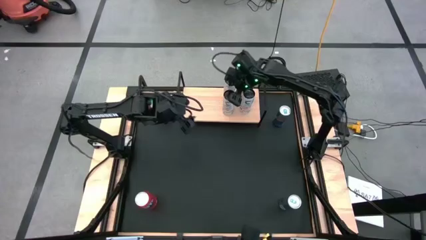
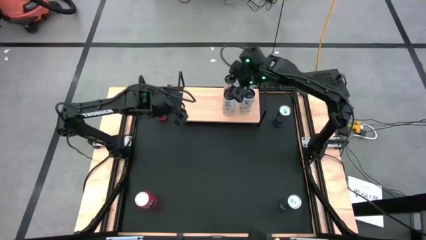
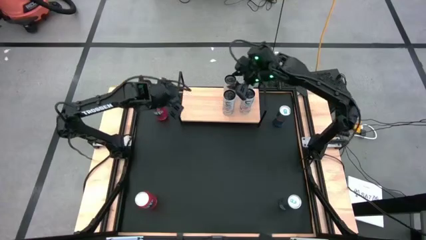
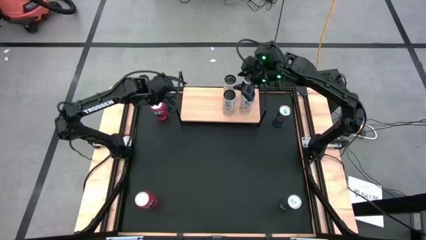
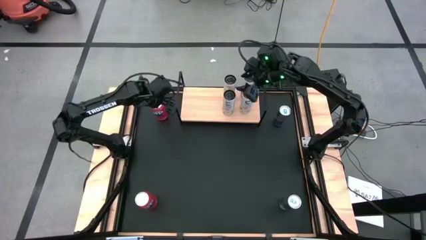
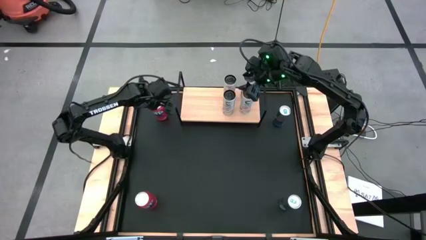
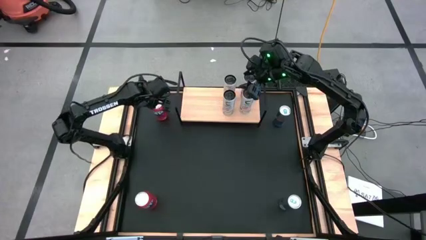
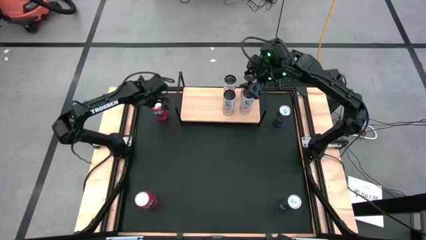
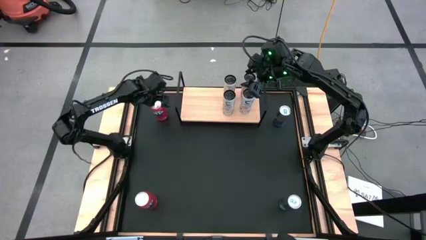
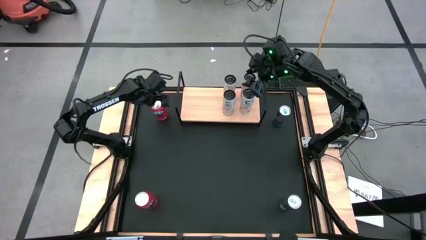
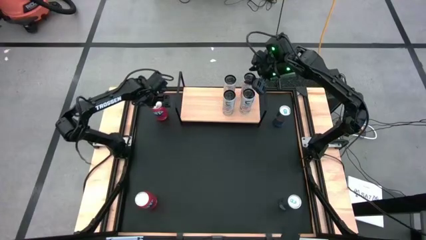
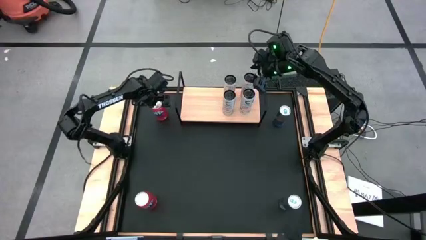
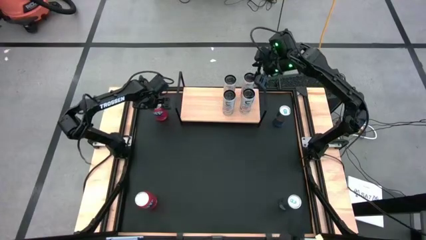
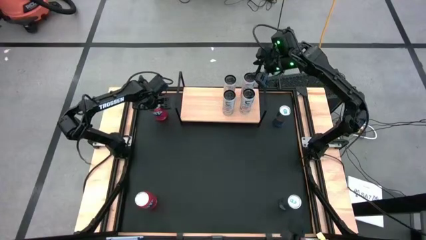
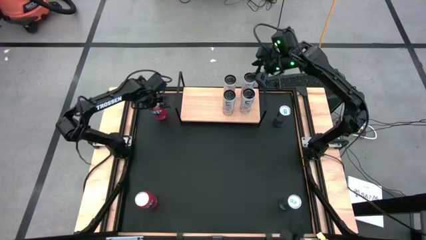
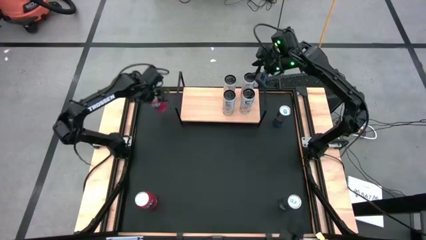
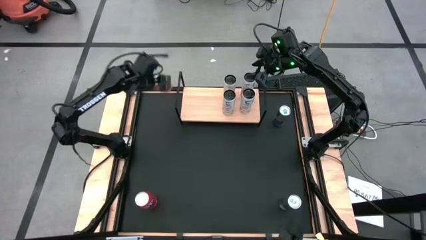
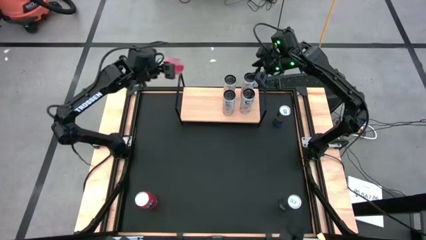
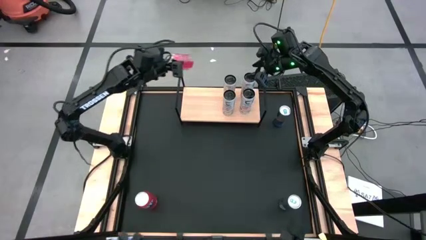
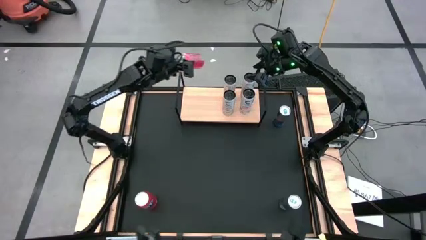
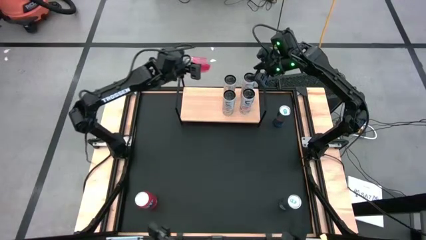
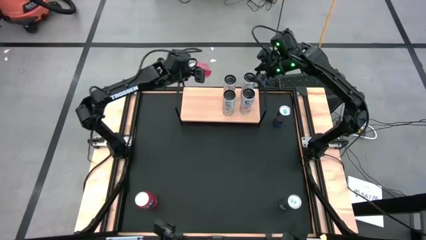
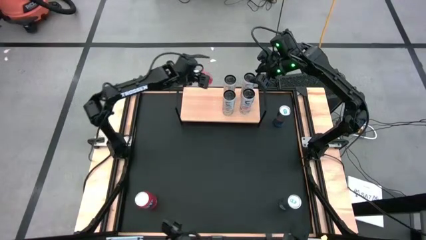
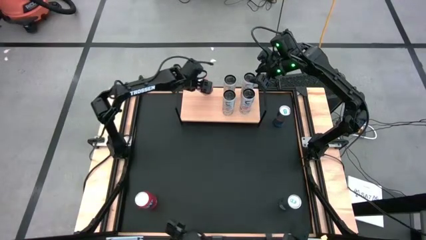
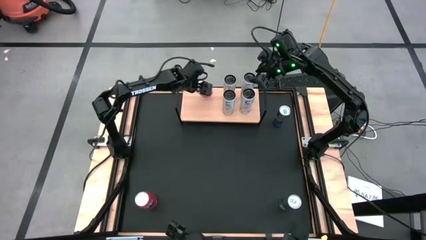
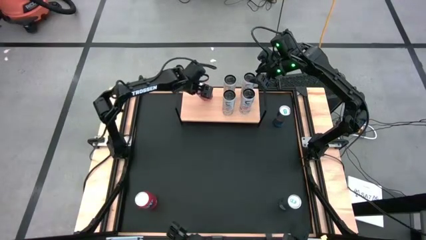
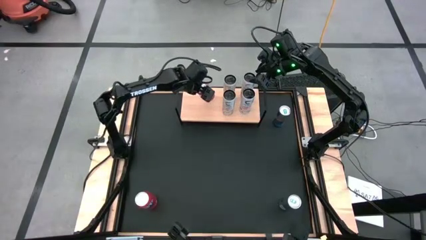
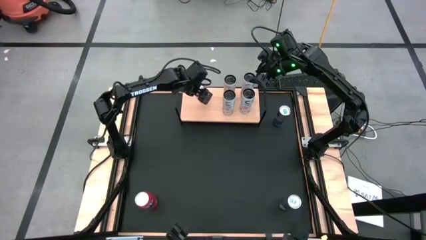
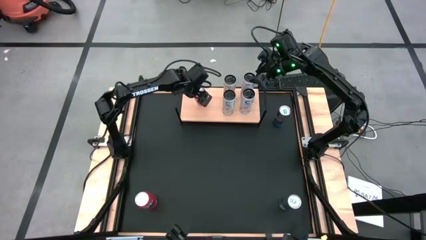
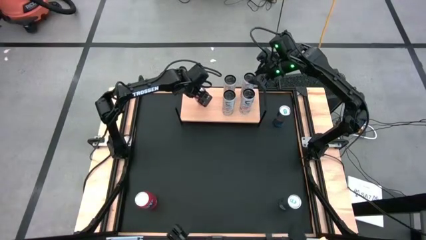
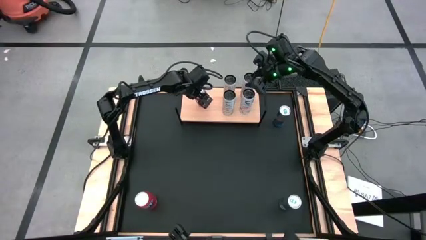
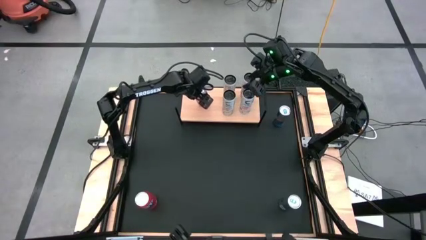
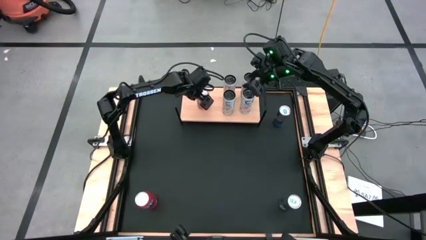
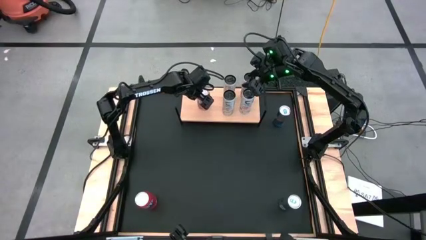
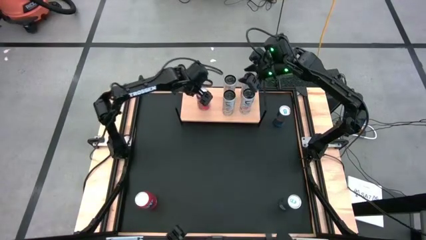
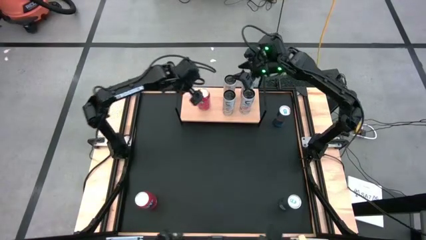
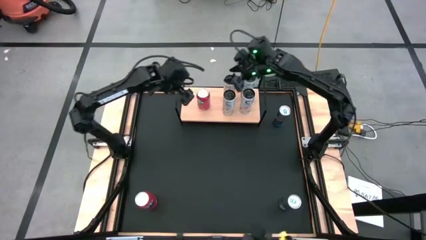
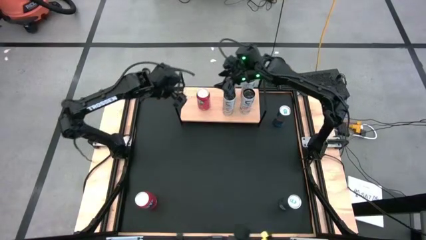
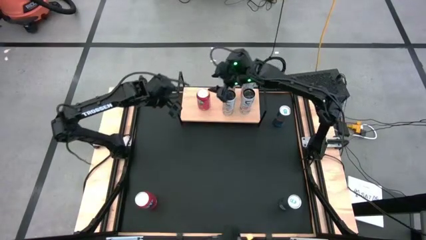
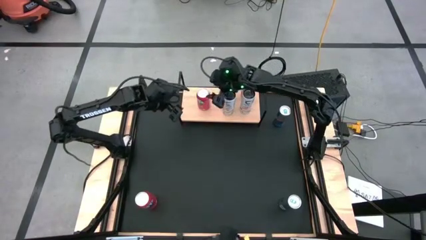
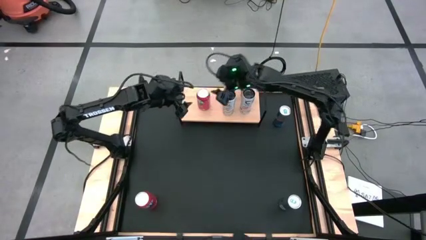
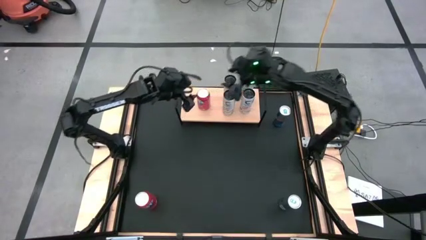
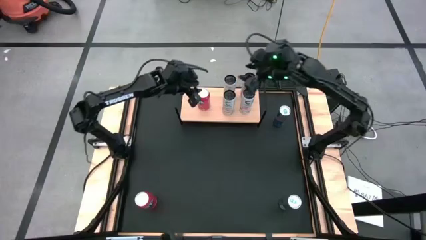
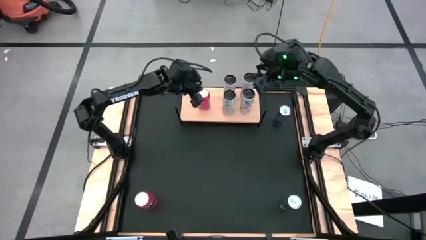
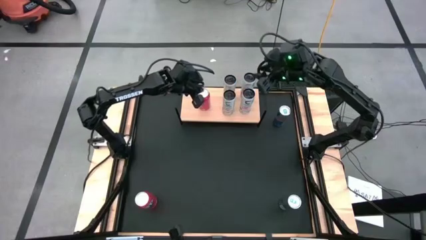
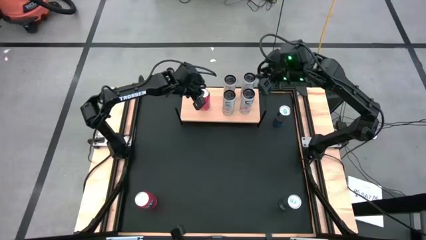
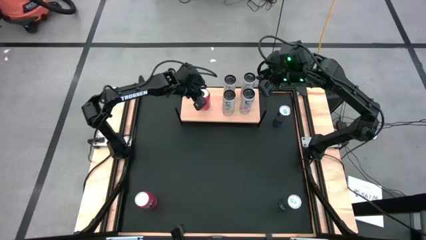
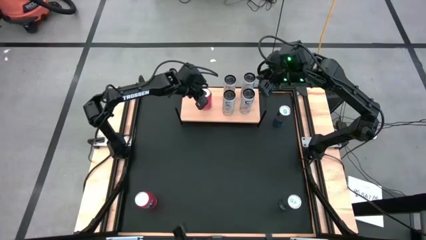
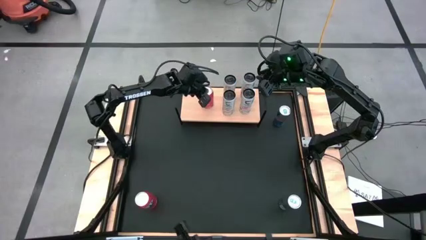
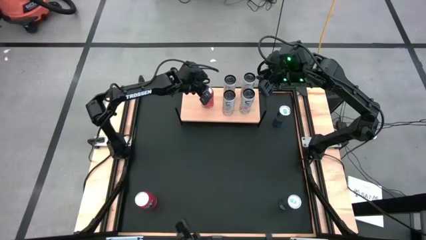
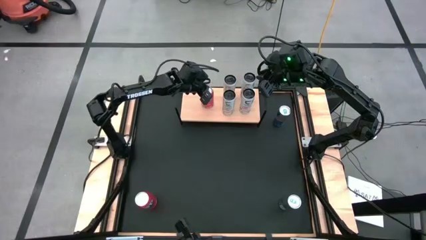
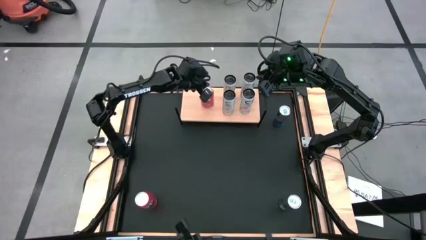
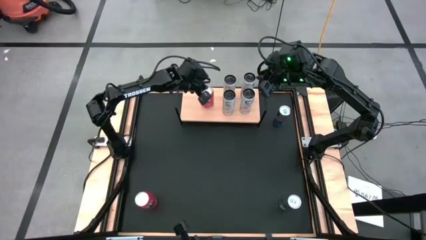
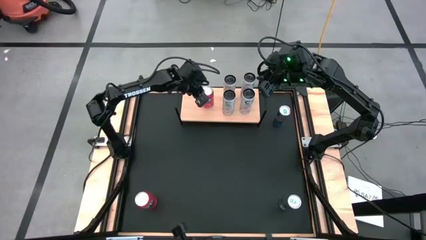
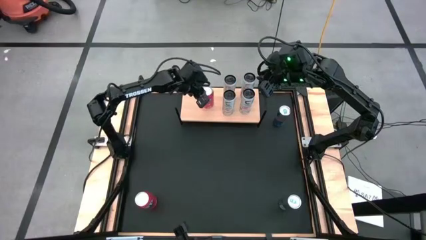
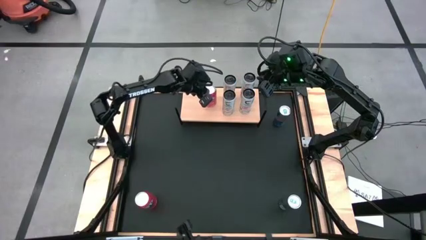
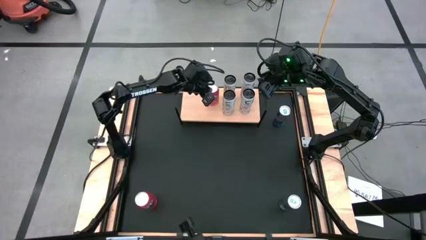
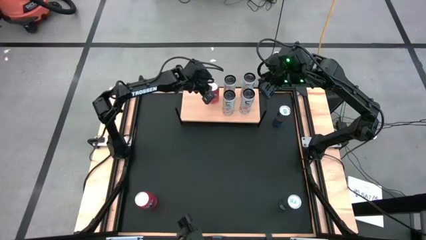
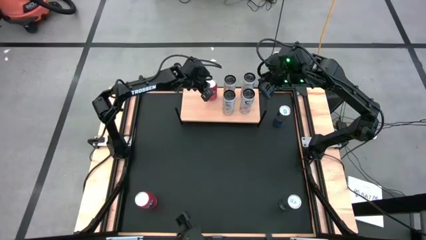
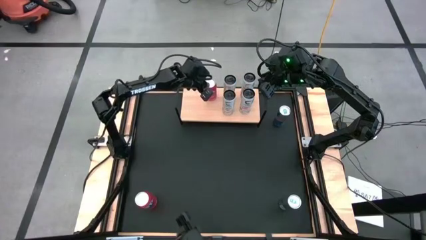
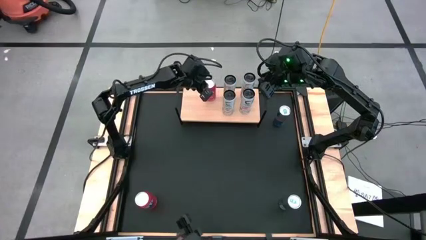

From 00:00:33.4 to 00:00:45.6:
Task: Place canned beverage on shelf
Put the top orange soda can on the shelf

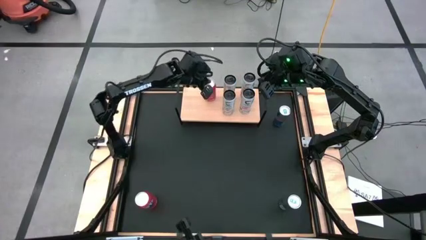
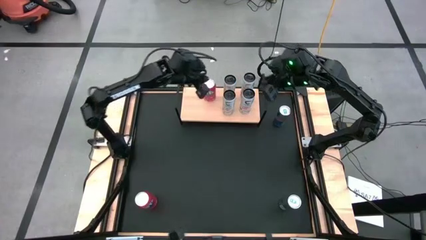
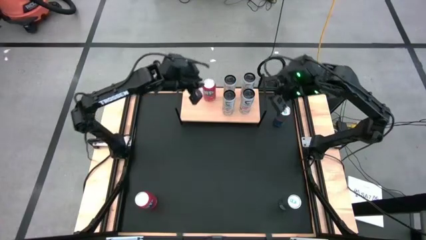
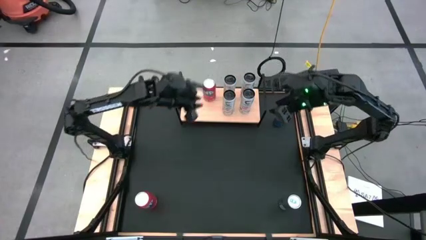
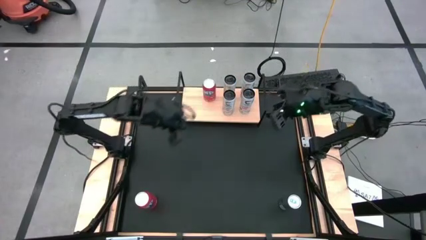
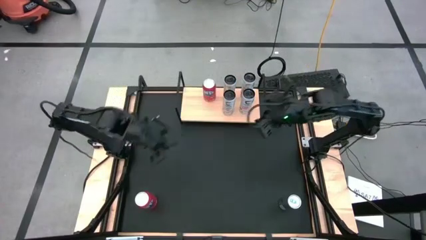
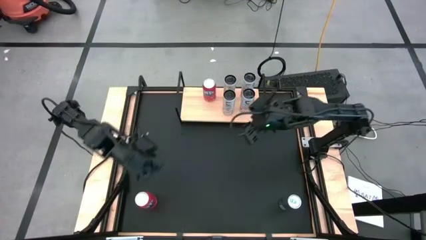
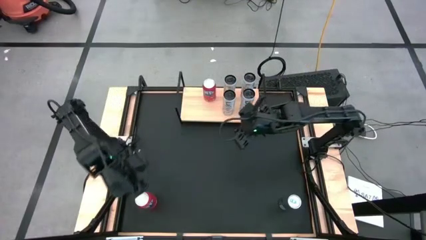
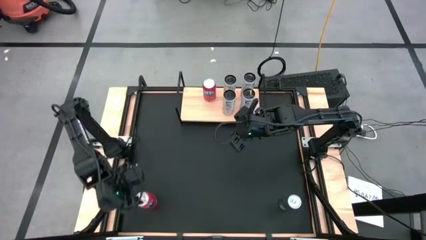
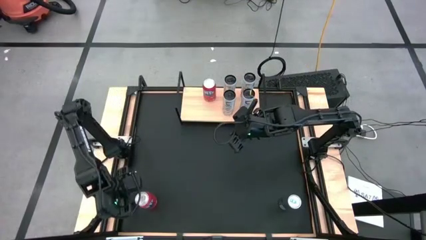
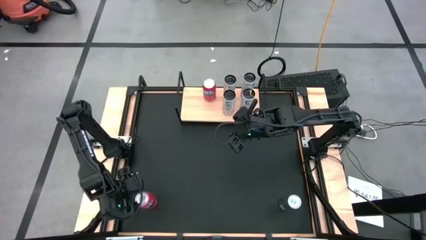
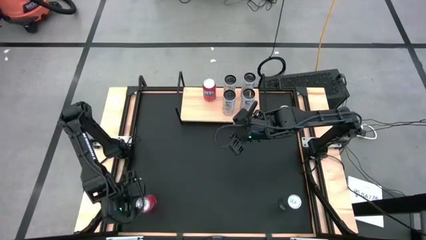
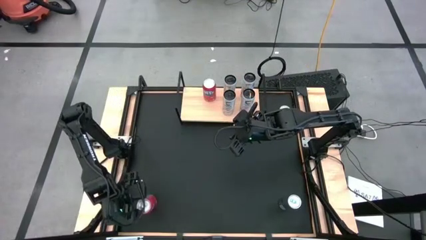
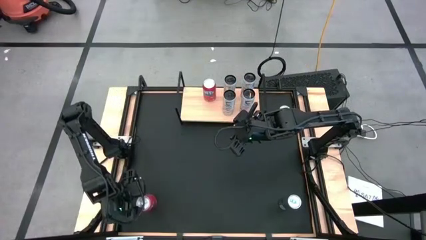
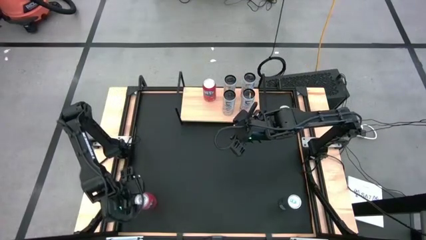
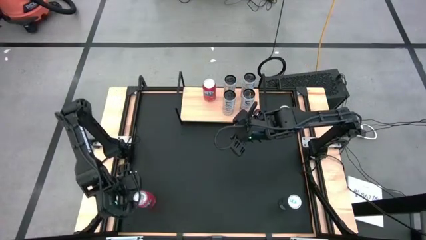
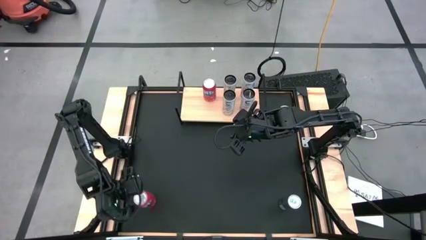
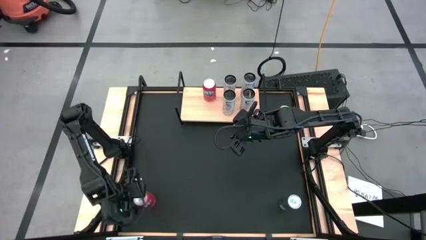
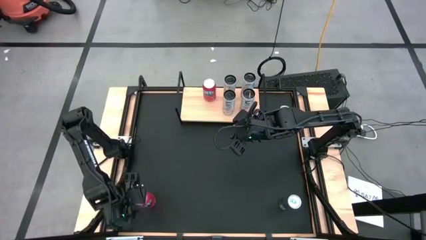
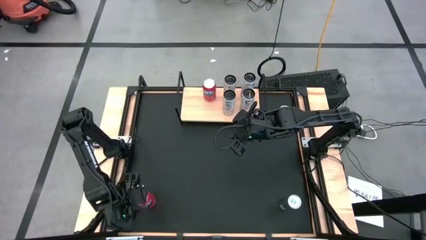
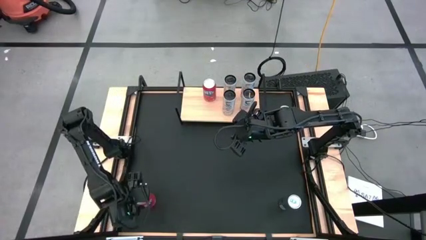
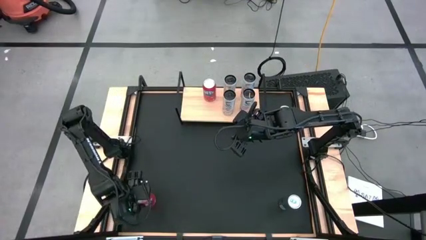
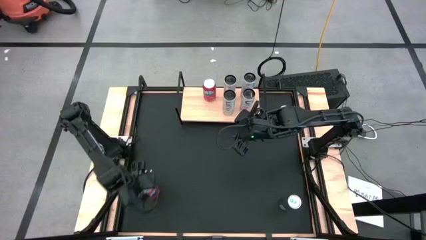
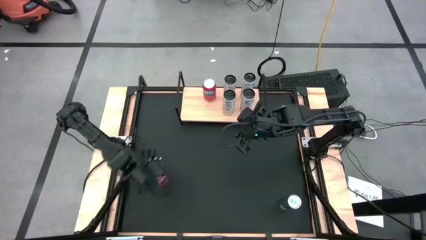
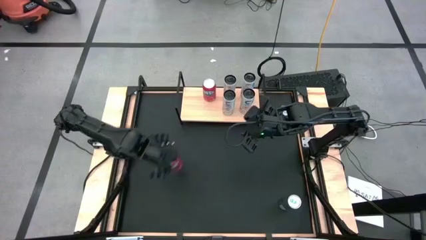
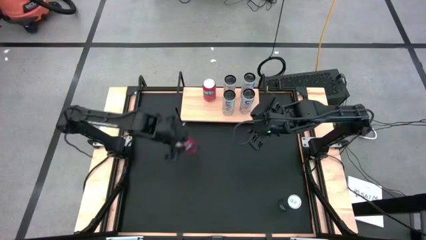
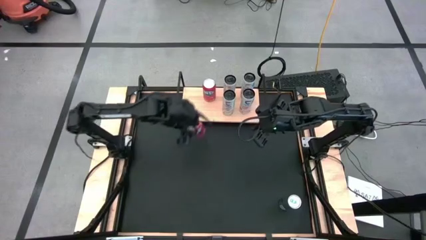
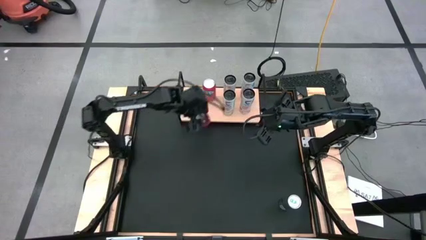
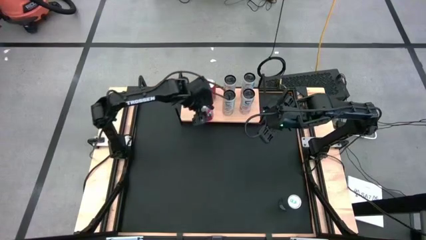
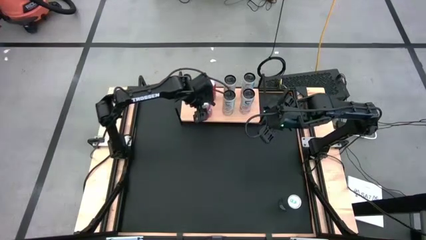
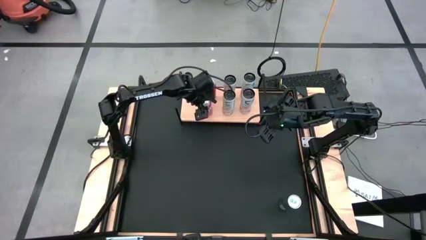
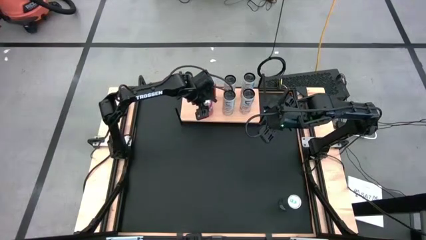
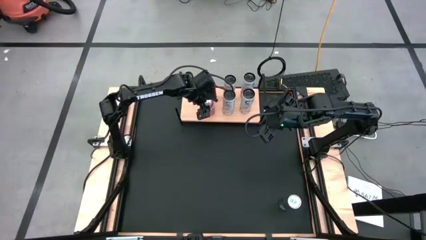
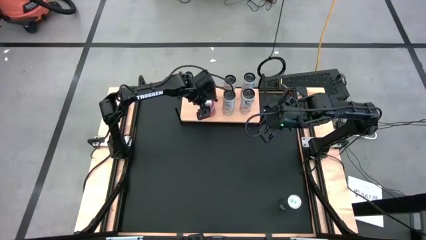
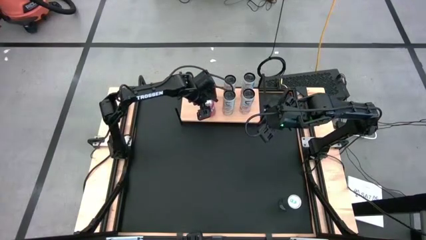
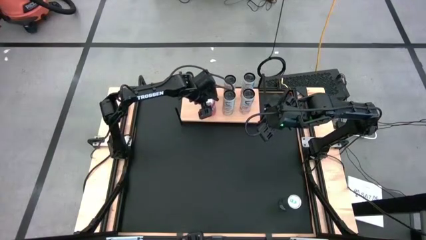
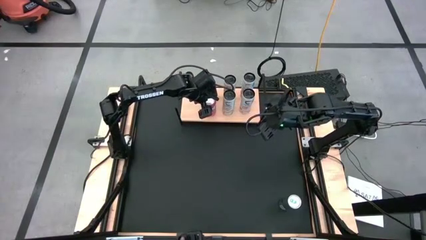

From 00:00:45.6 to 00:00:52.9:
Put the orange soda can on the shelf
